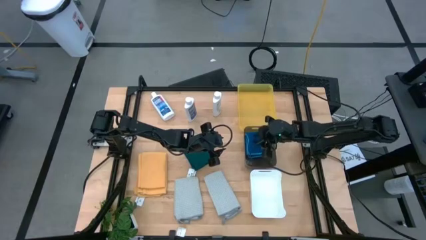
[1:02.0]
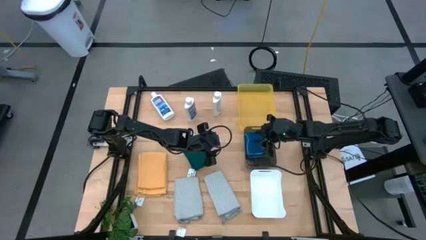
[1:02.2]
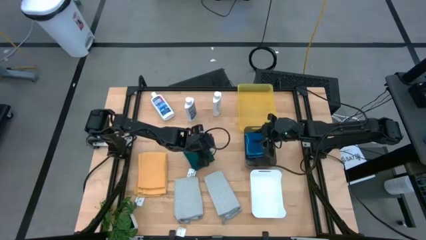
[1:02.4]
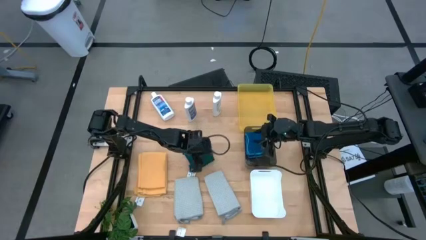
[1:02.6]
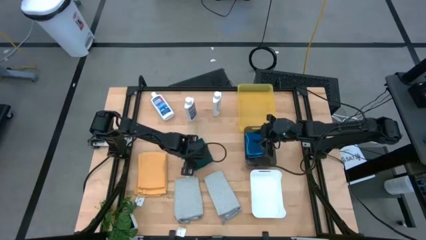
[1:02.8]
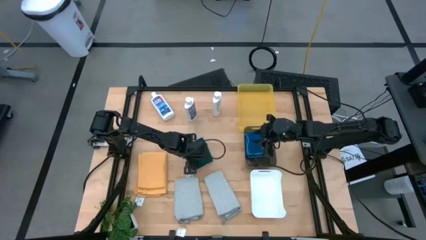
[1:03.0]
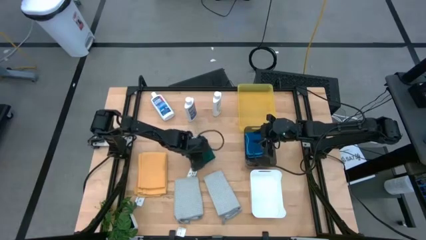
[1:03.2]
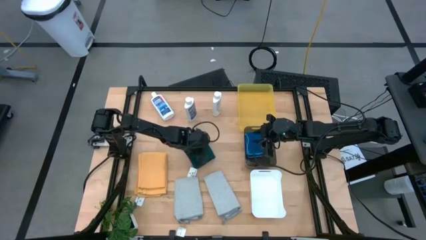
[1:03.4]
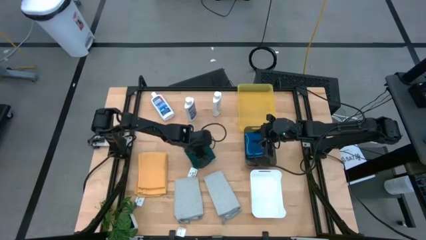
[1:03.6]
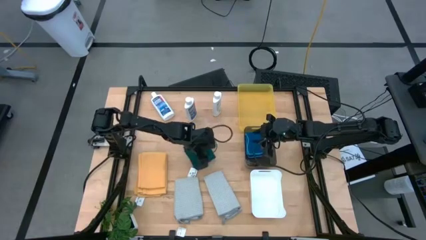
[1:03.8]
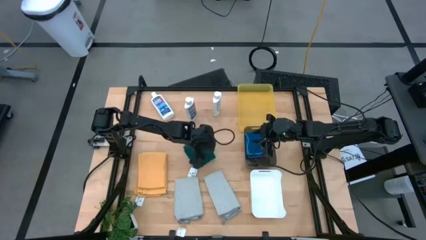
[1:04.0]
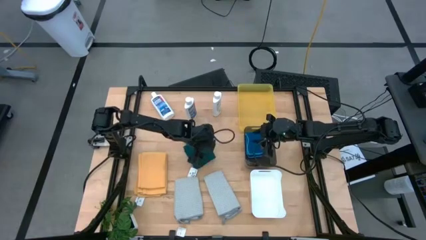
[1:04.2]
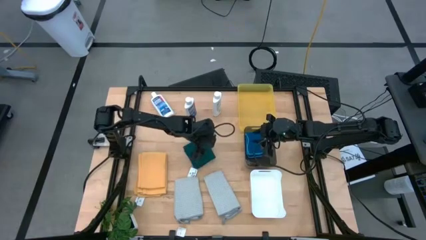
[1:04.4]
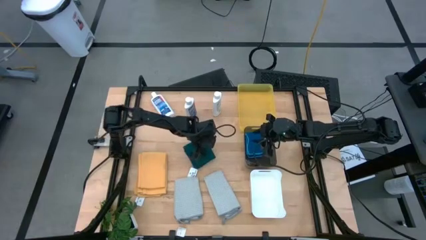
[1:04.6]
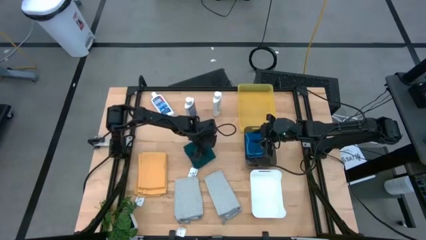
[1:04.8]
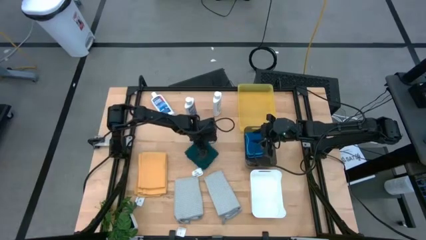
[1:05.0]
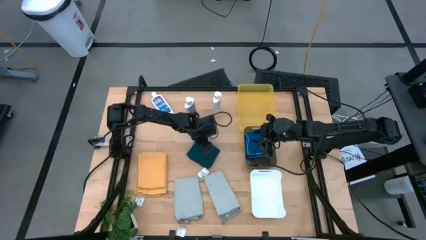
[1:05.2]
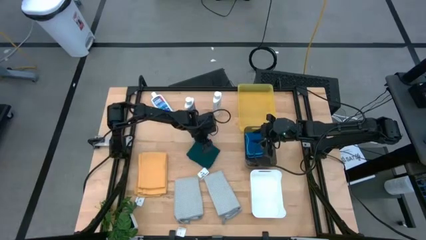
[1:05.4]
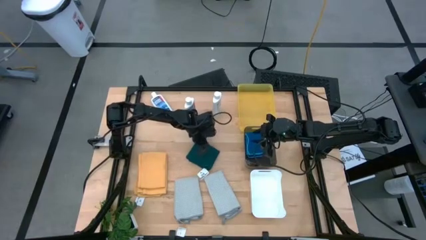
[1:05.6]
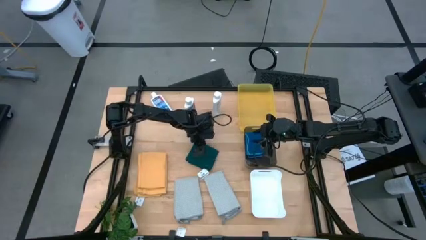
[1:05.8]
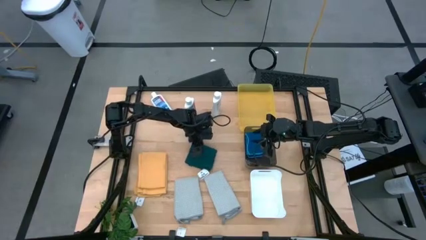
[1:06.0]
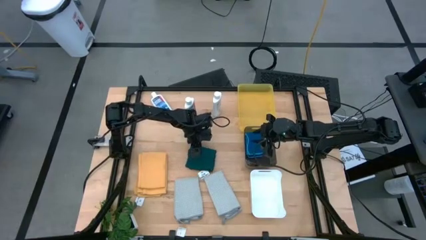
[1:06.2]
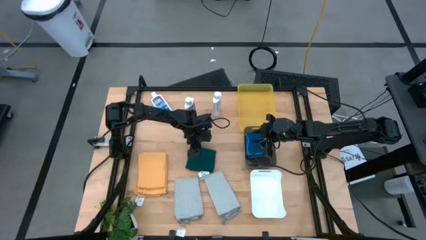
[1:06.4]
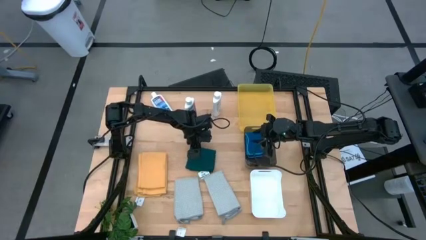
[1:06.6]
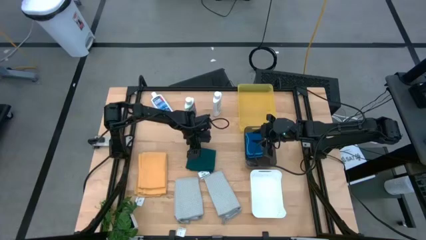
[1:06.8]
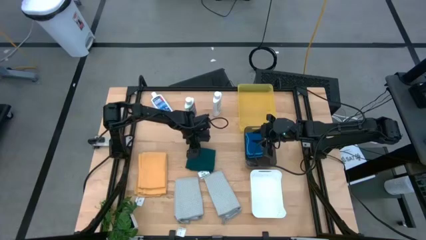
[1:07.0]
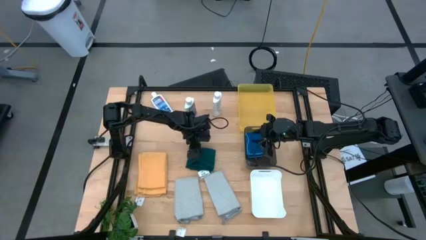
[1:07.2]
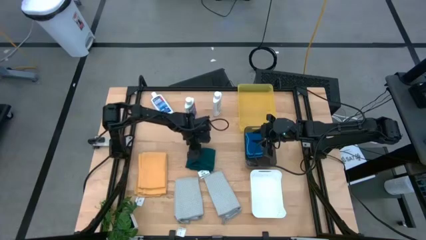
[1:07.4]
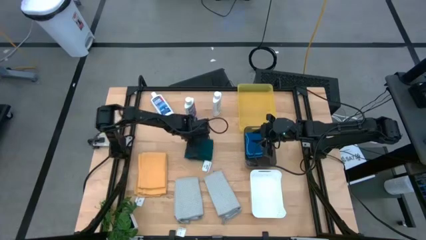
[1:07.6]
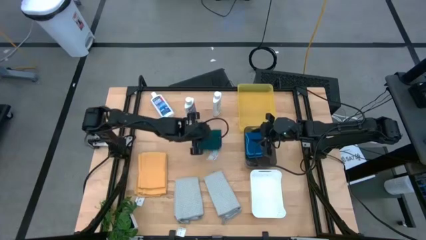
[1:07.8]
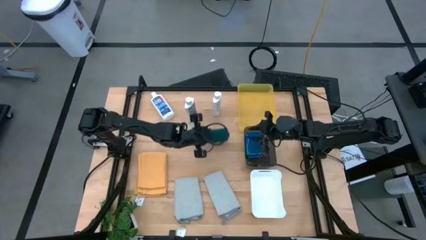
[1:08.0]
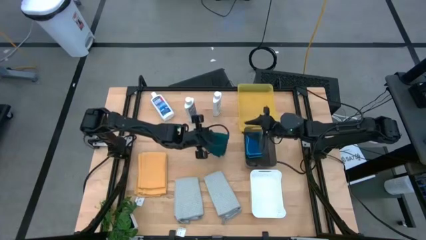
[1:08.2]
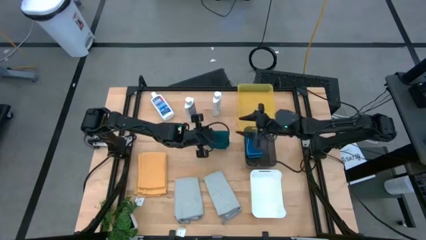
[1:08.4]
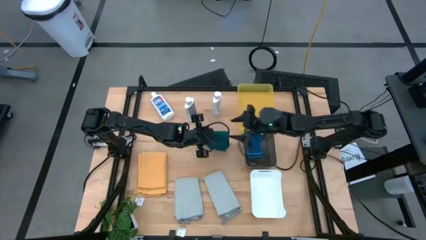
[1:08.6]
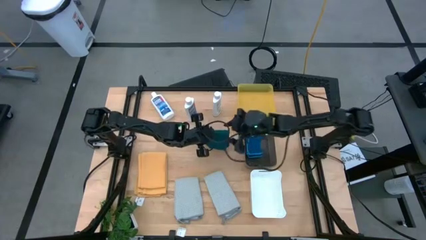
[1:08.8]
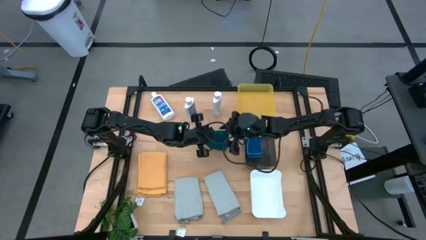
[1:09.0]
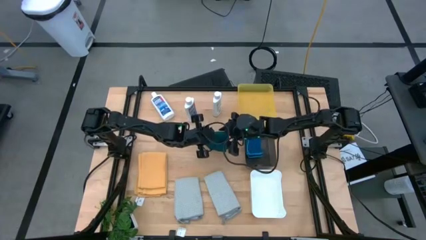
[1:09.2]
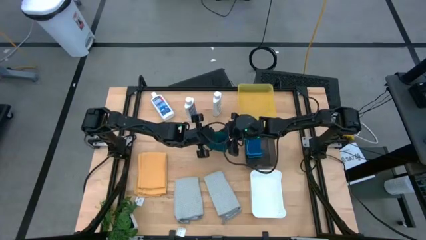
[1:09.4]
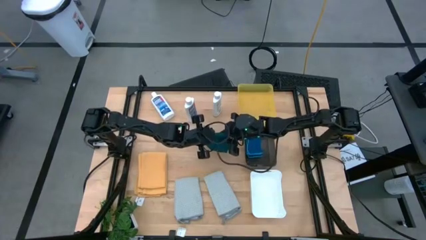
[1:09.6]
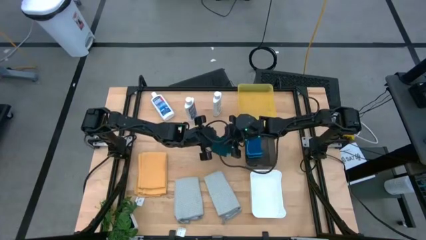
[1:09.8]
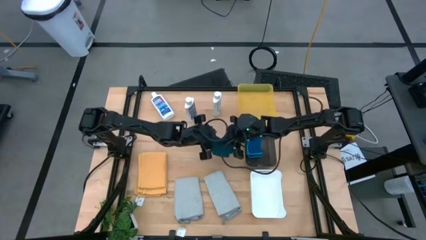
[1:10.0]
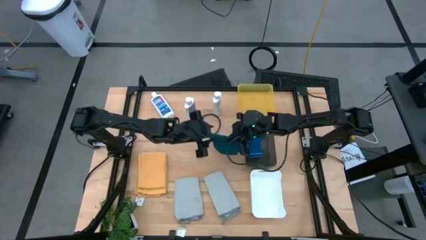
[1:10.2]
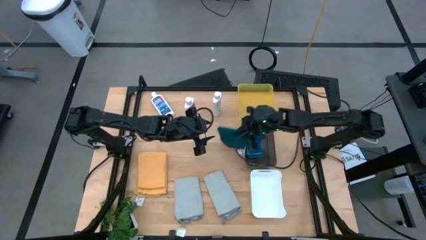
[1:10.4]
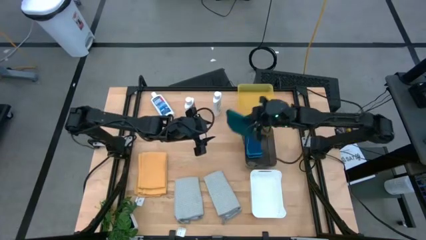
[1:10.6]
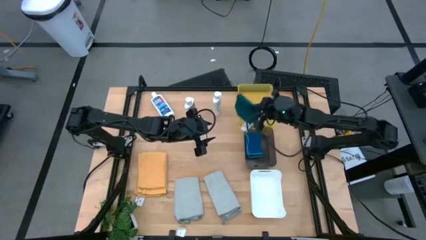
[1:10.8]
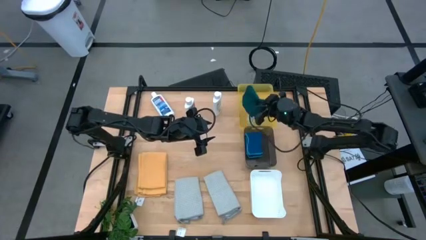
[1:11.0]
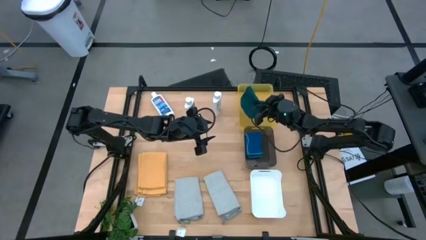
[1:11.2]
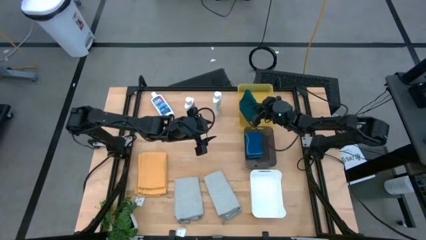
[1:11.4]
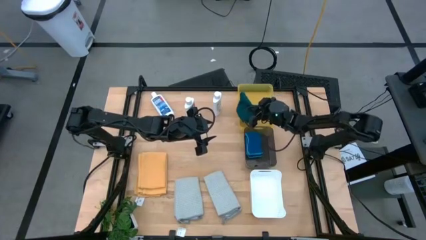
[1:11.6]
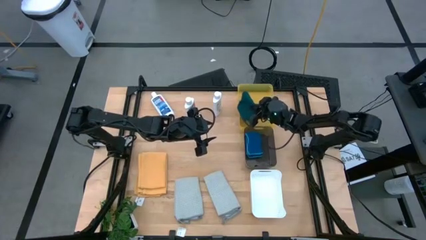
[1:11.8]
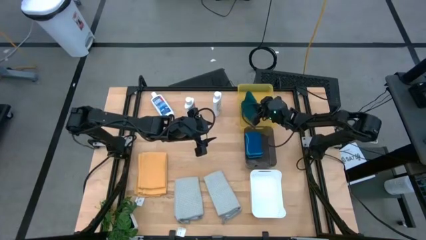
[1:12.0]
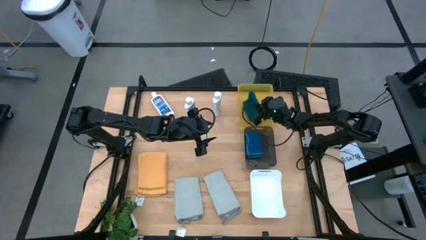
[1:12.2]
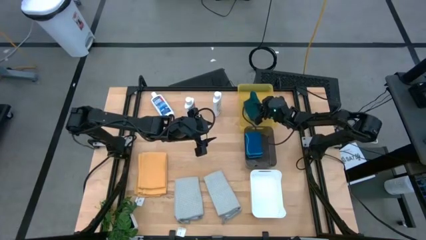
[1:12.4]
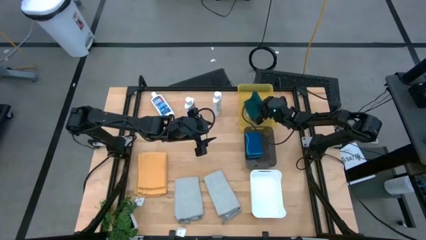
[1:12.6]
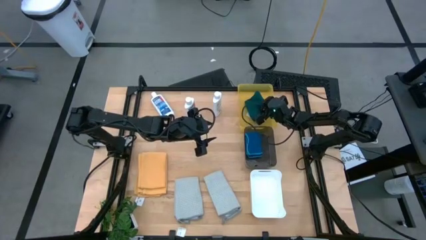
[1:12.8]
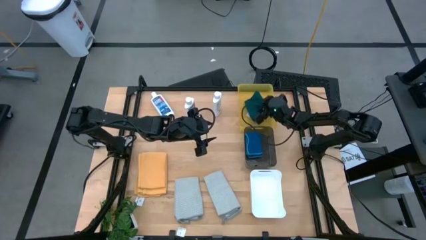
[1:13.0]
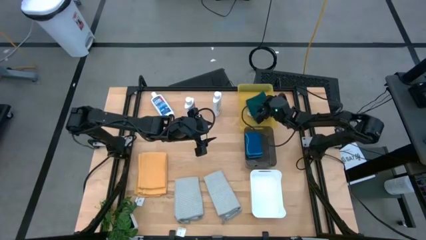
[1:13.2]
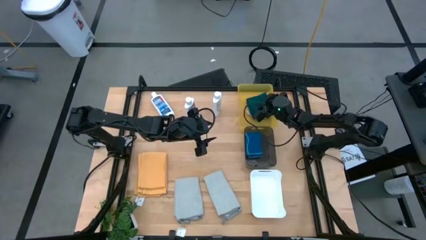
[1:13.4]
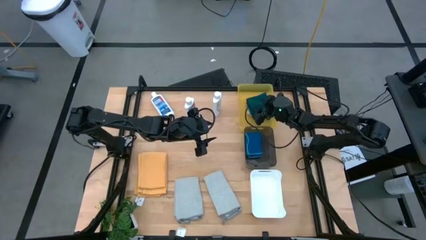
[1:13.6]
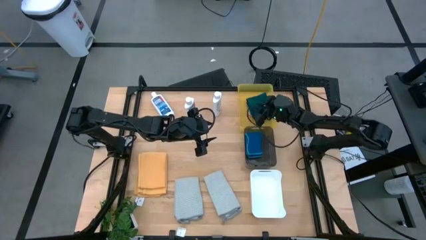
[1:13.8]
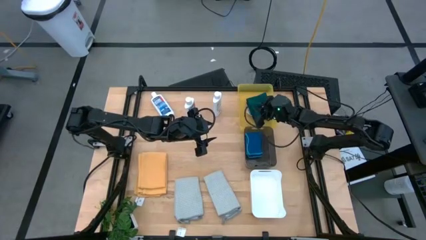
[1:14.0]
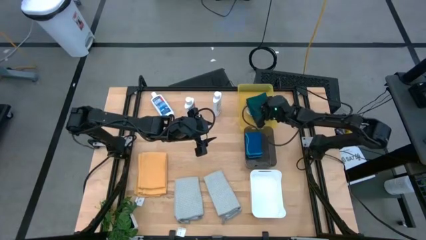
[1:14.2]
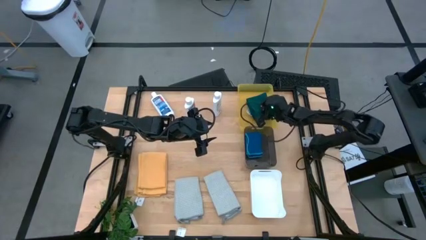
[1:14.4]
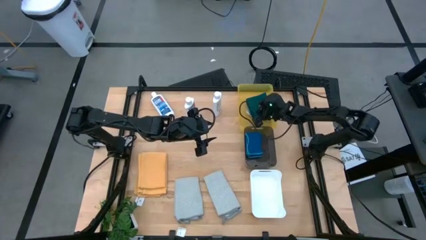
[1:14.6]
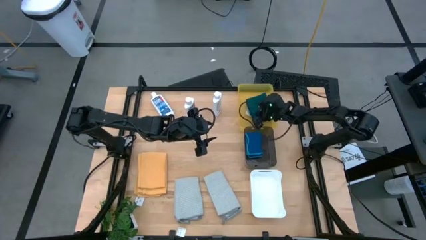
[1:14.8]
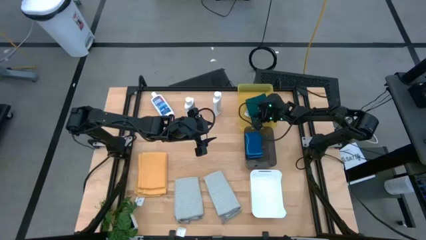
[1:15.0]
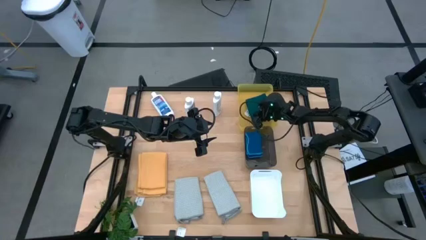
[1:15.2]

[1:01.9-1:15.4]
Task: Pick & Place Kitchen Items
Put the green towel into the yellow bin
